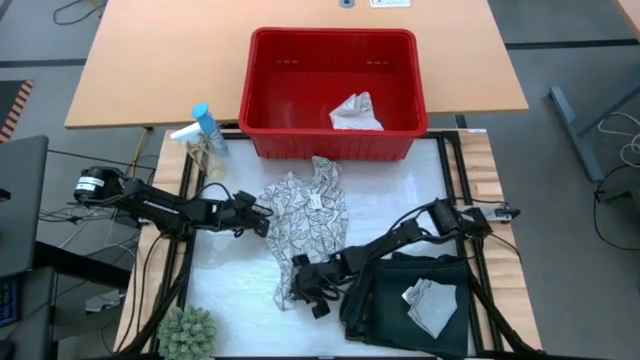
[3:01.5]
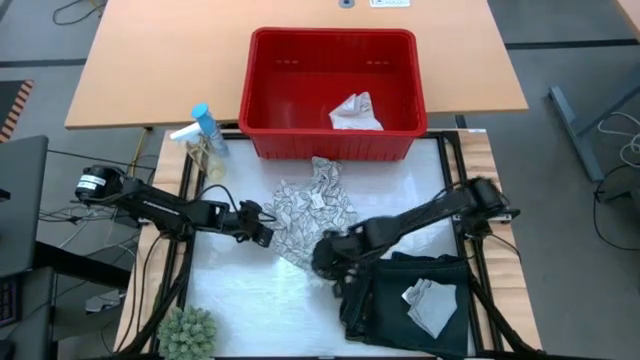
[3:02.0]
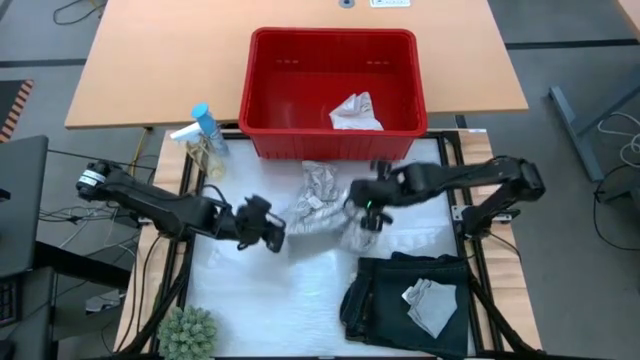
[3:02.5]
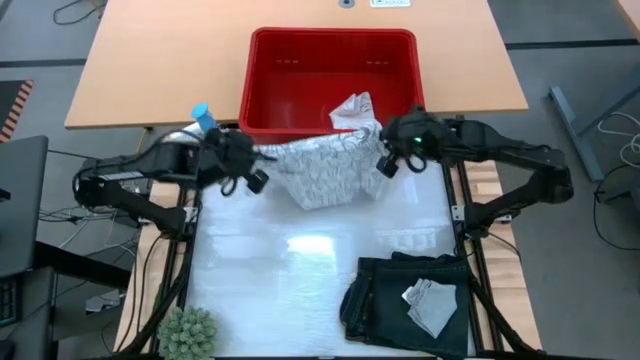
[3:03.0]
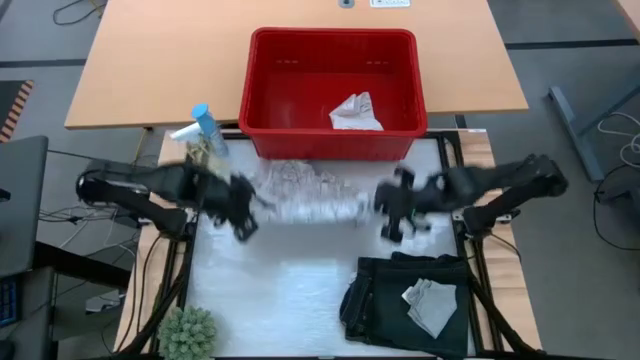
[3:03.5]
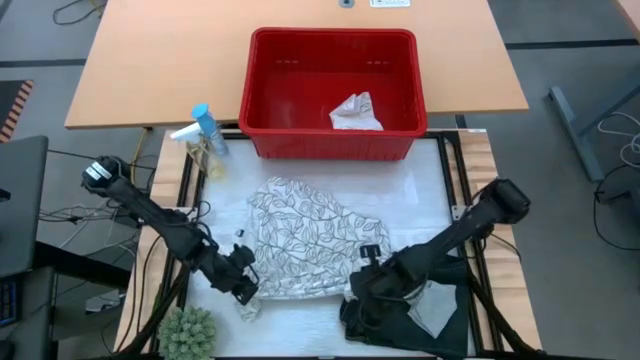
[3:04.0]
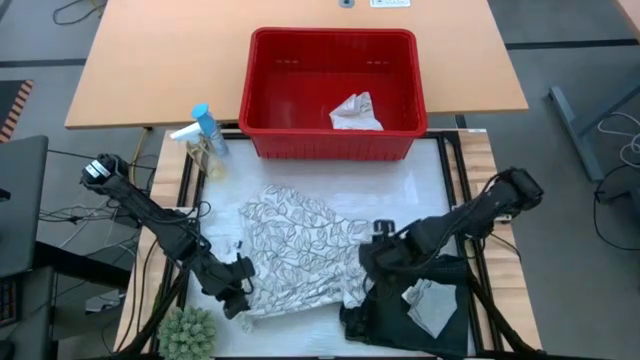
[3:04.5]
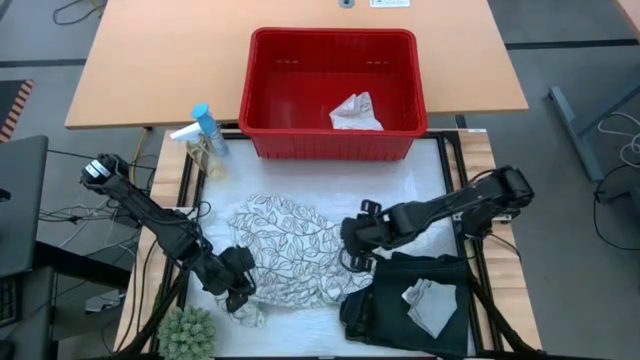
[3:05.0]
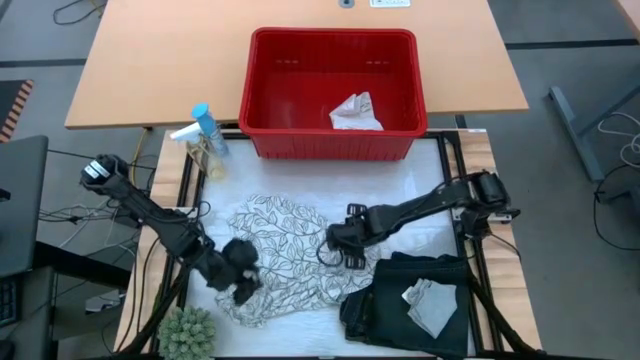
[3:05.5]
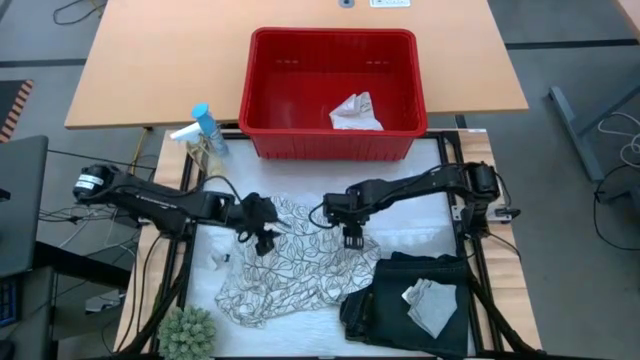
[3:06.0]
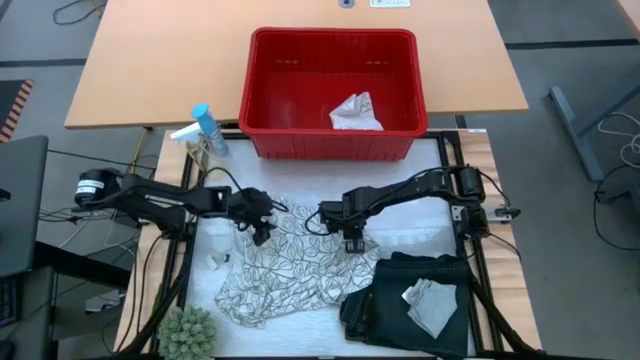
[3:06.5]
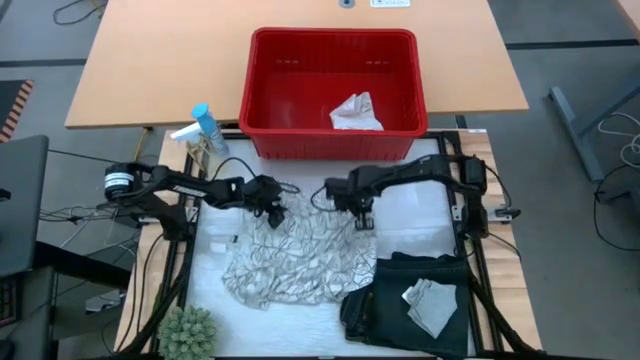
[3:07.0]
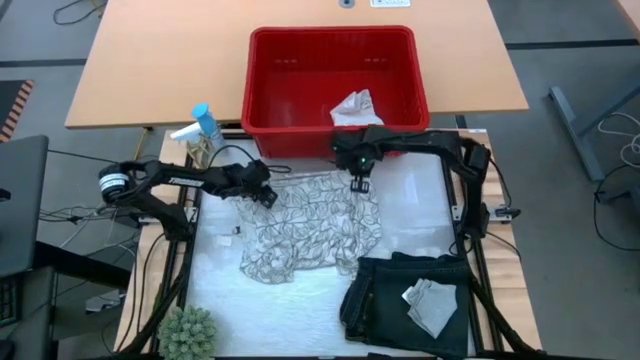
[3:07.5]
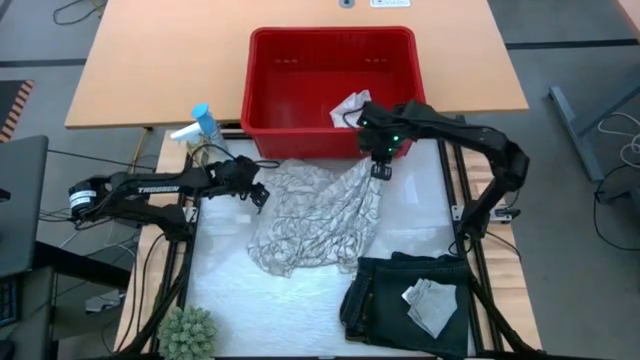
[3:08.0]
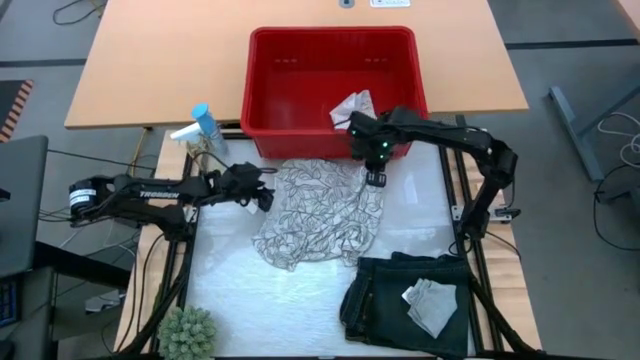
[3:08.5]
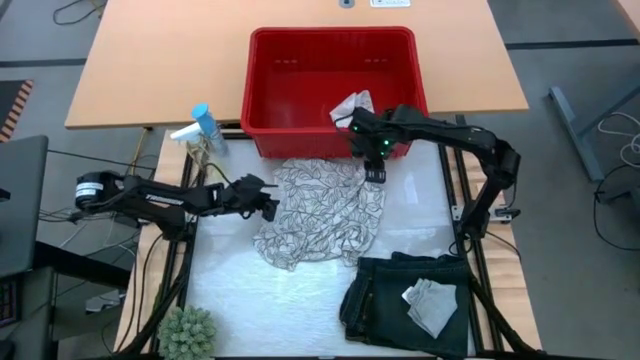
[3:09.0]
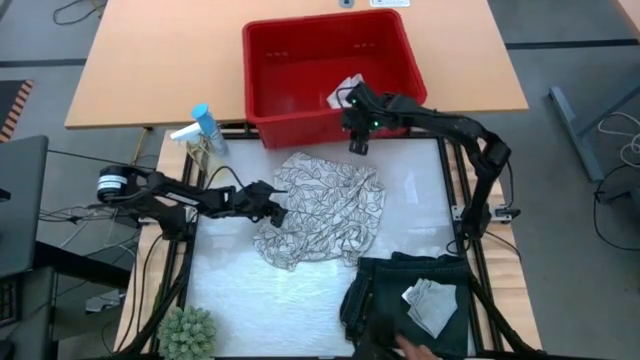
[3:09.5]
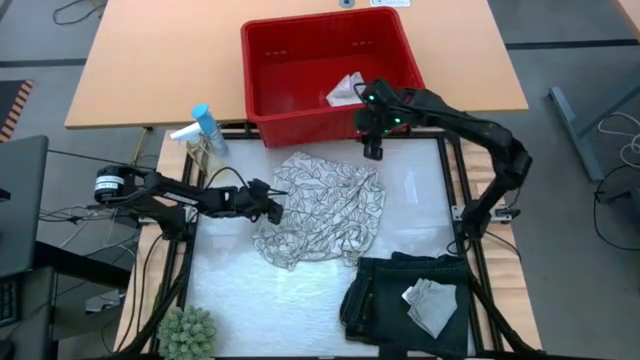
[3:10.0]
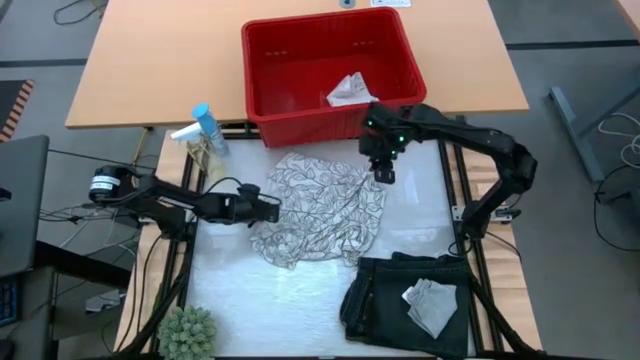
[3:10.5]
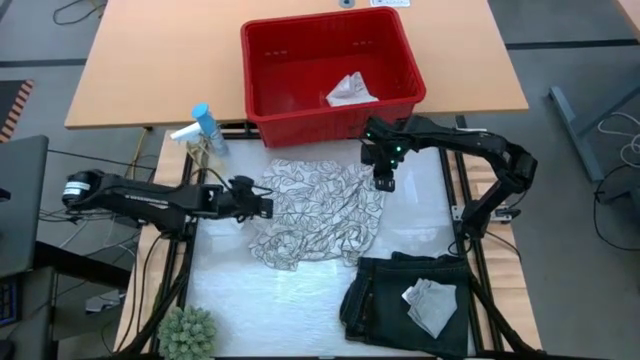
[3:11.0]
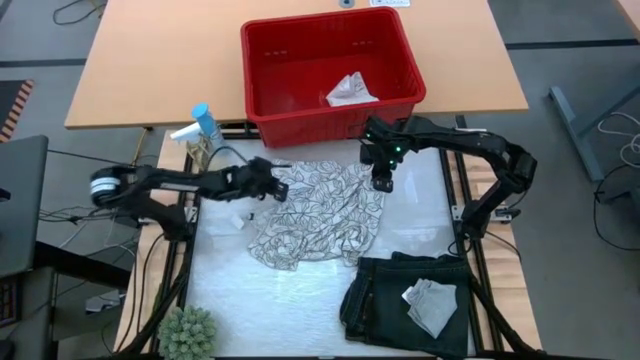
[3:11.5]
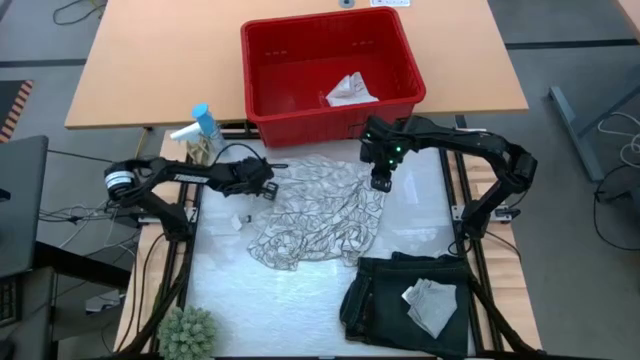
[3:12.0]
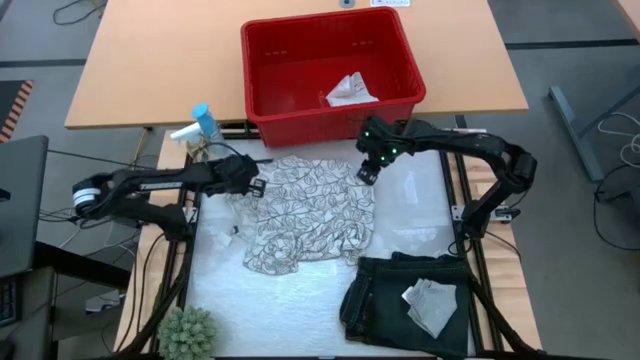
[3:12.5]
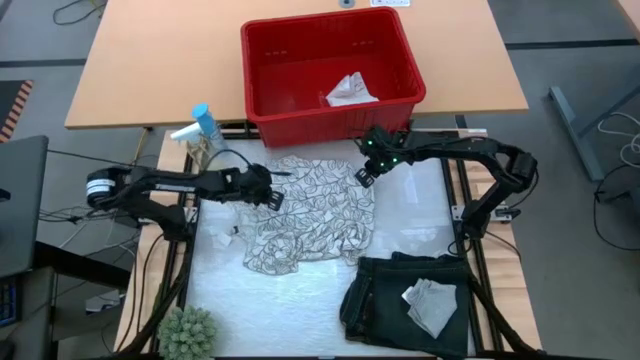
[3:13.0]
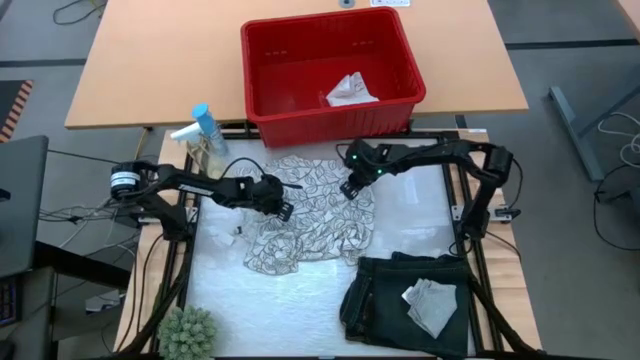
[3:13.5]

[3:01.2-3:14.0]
Task: Fold Laundry from Bin
Fold the white from the red laundry bin

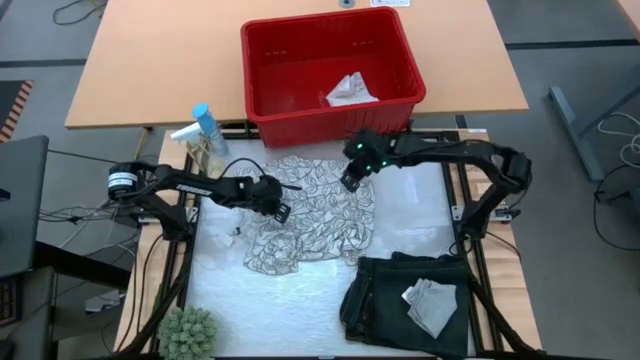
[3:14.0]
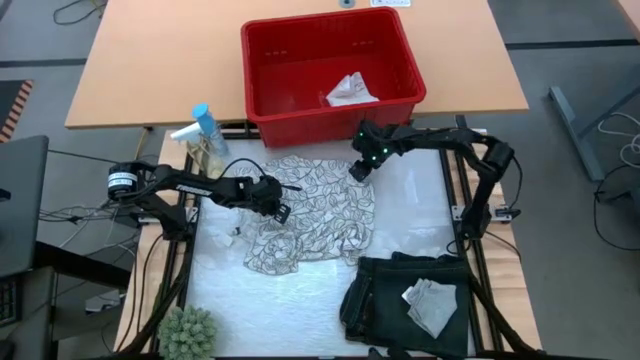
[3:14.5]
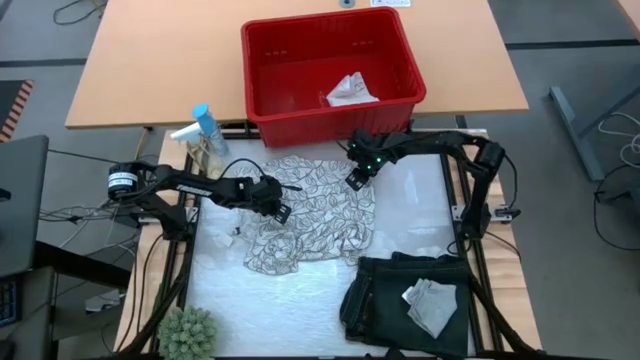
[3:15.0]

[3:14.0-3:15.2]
Fold the white from the red laundry bin

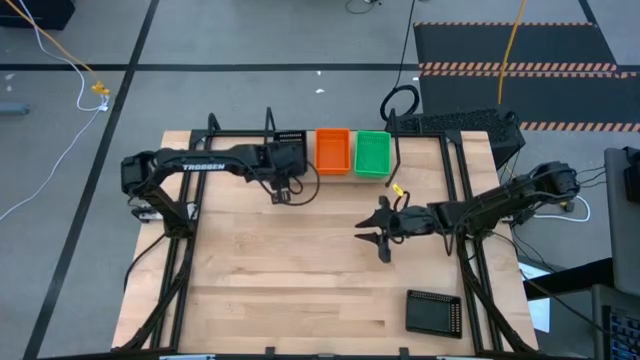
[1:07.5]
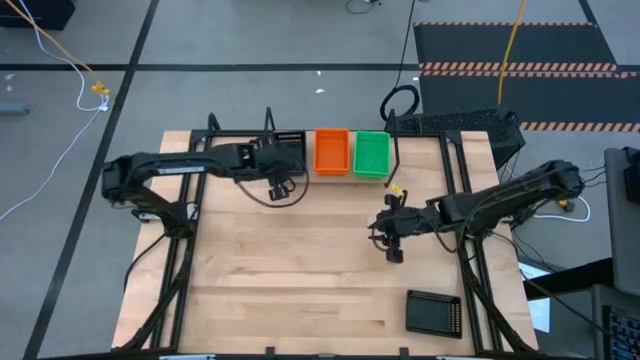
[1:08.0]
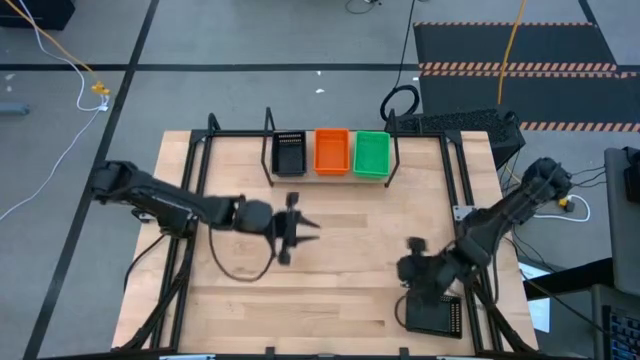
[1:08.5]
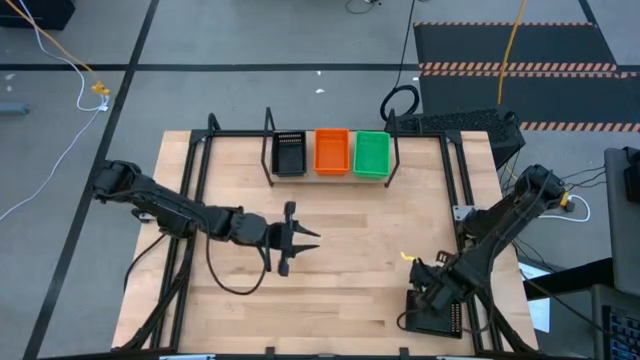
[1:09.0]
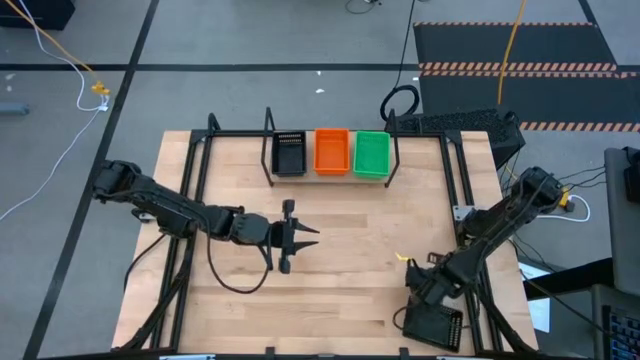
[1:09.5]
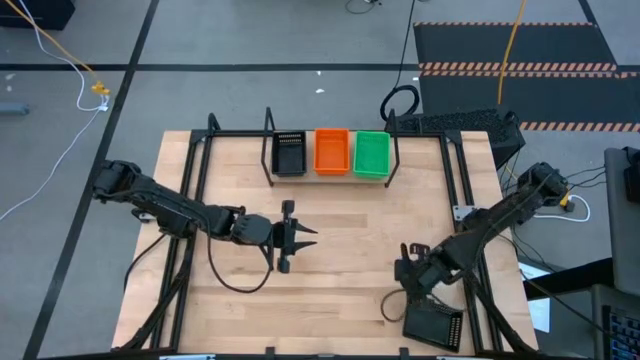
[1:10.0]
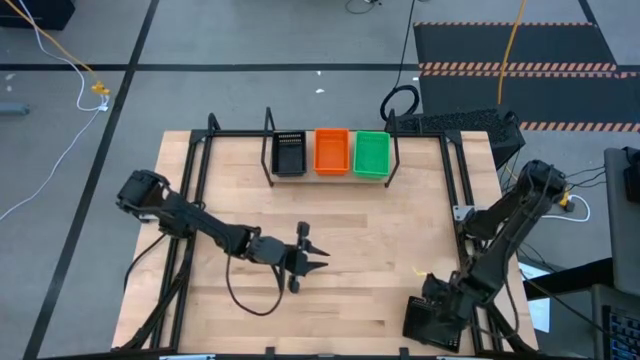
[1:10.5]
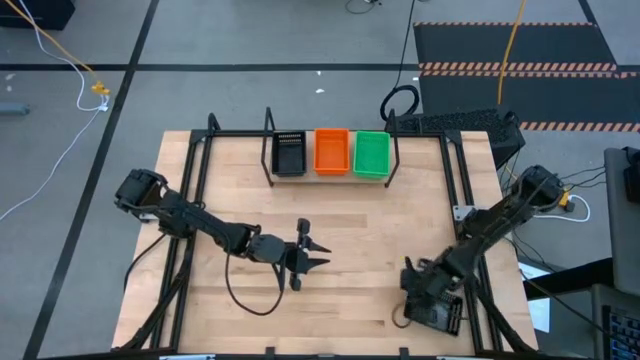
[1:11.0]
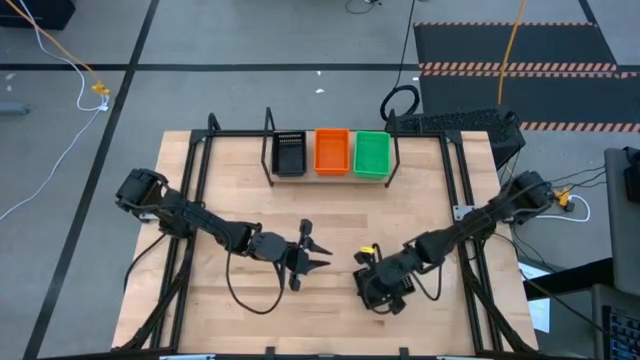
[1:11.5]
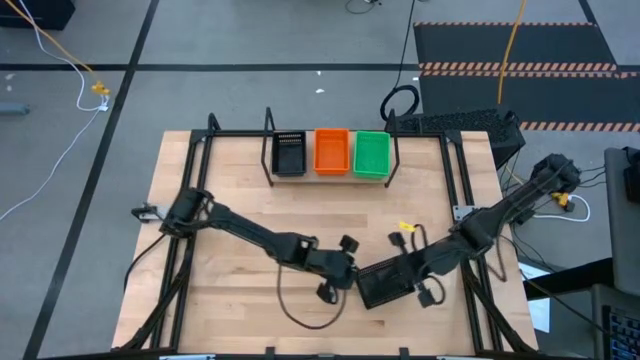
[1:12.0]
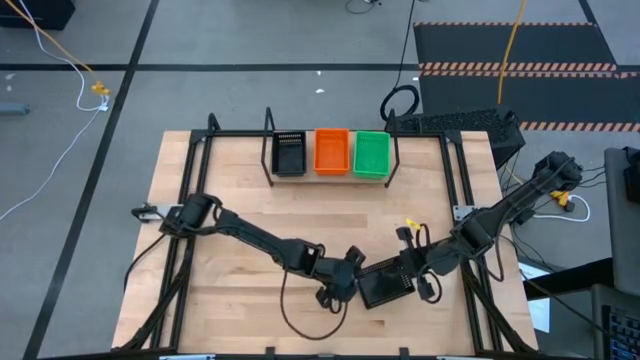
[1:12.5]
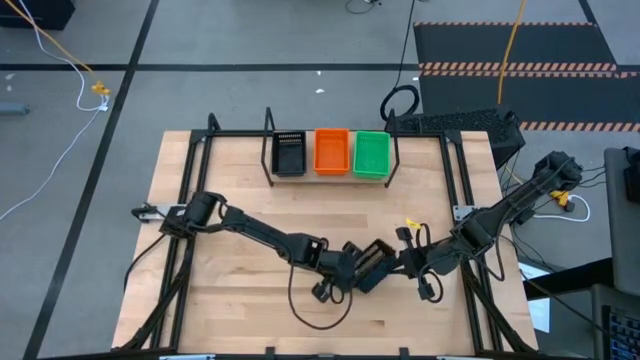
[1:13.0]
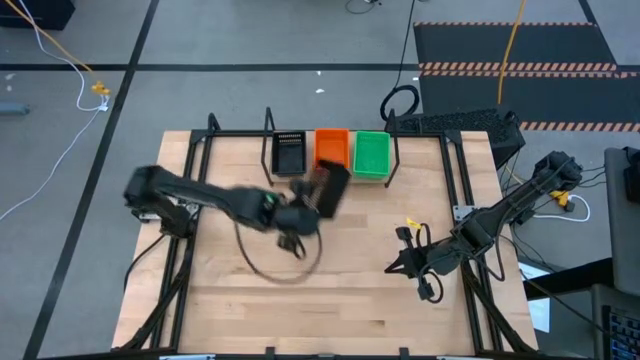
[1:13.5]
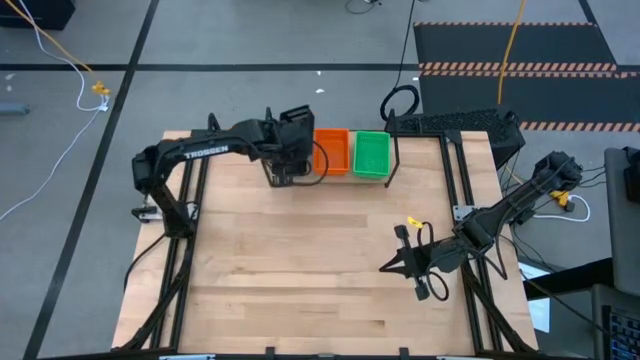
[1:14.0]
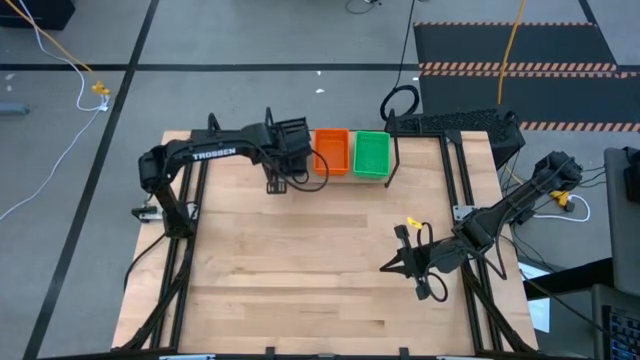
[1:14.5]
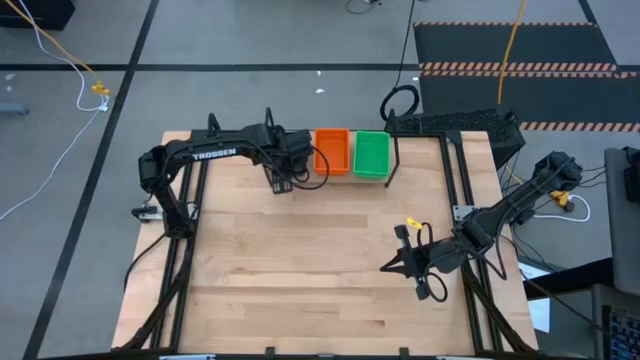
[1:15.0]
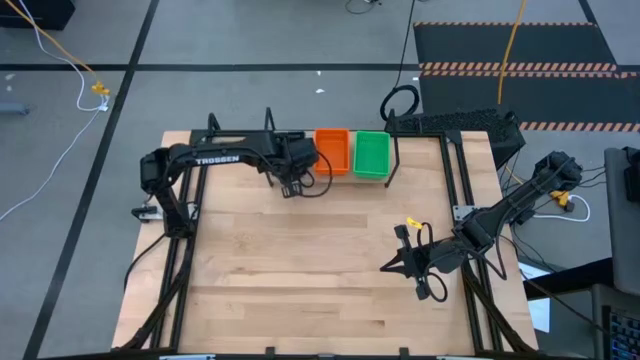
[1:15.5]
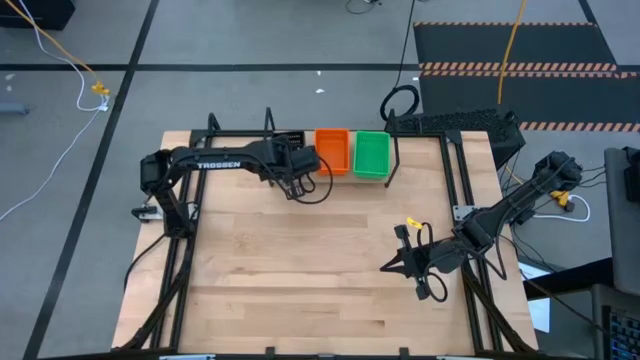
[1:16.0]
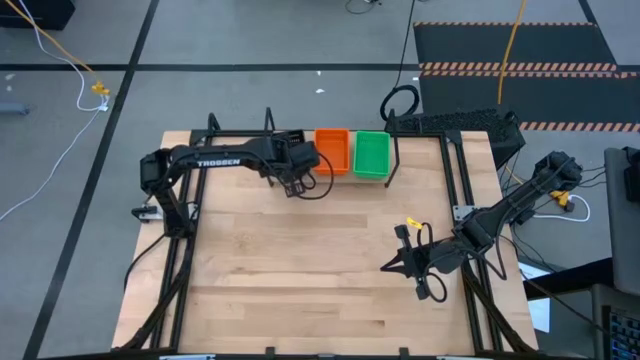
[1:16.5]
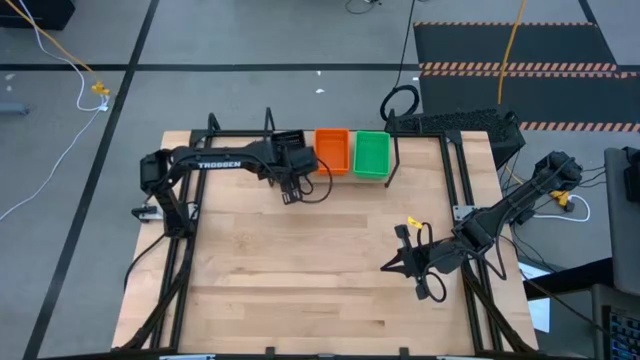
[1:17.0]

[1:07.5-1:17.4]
Task: Stack baskets on shelf by color
Stack the black bin on top of the black bin on the shelf
